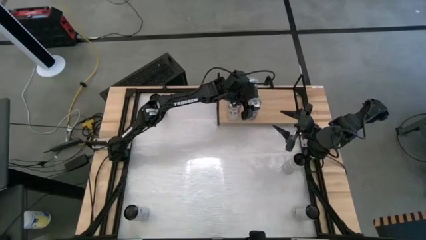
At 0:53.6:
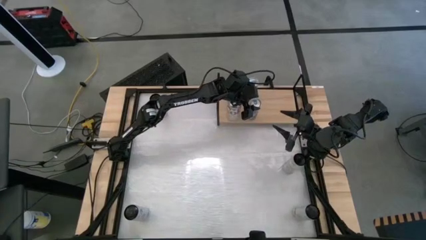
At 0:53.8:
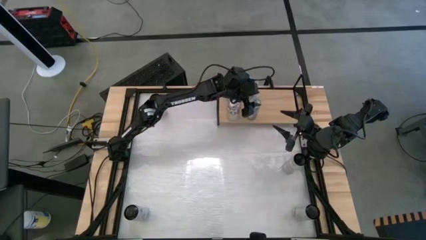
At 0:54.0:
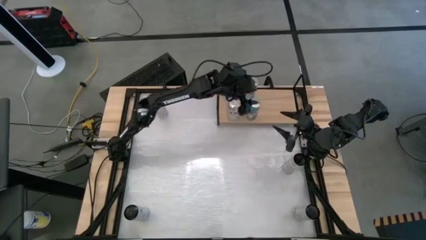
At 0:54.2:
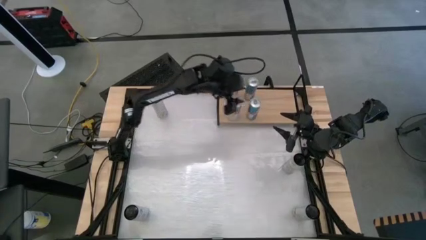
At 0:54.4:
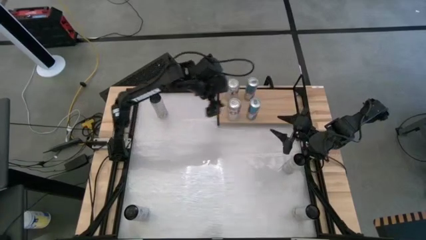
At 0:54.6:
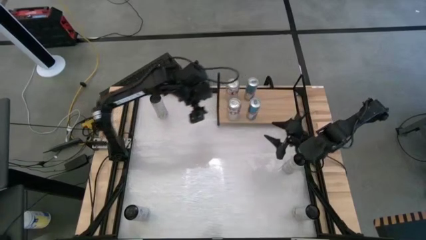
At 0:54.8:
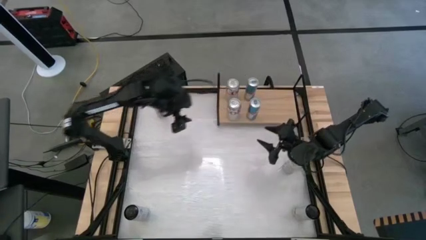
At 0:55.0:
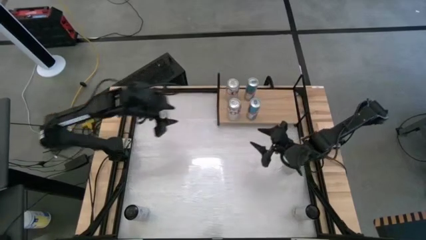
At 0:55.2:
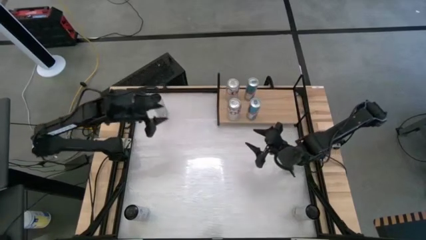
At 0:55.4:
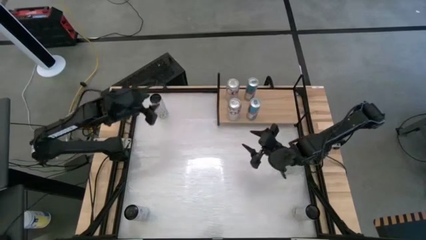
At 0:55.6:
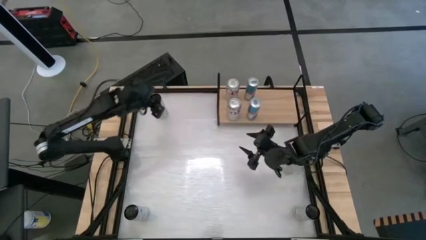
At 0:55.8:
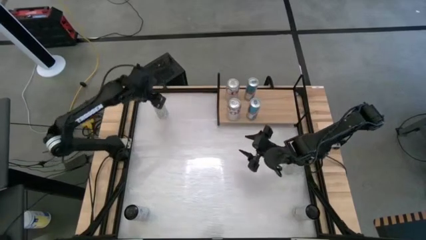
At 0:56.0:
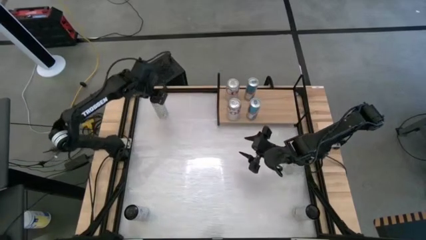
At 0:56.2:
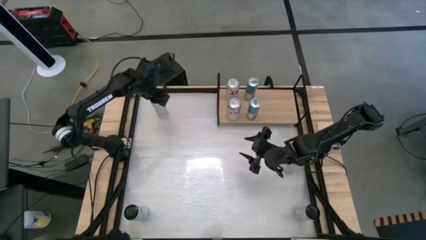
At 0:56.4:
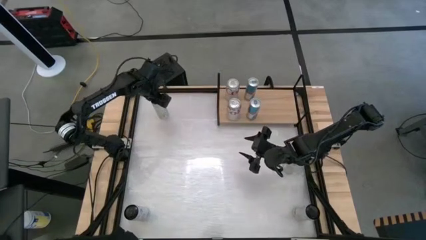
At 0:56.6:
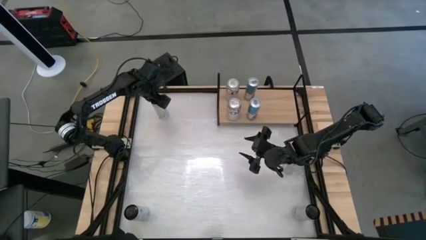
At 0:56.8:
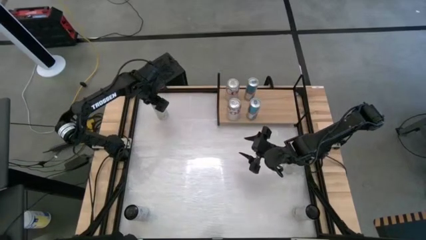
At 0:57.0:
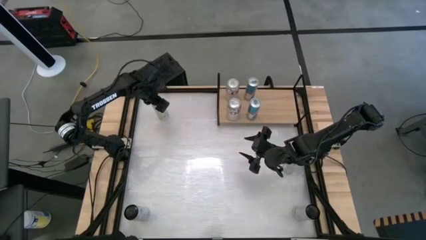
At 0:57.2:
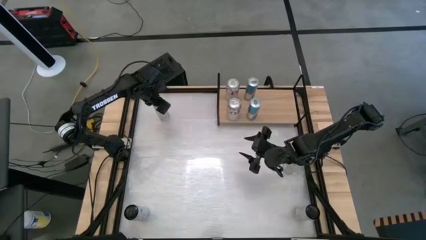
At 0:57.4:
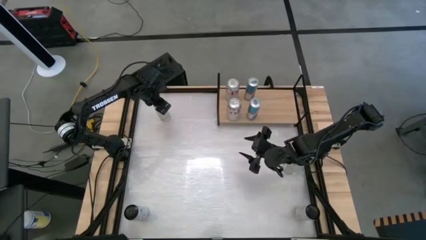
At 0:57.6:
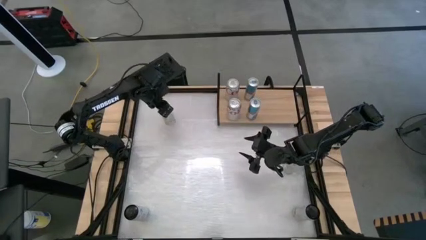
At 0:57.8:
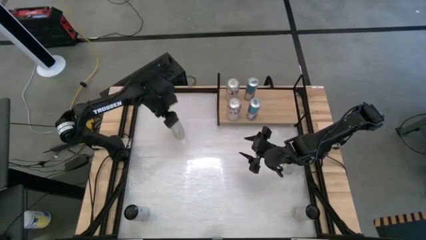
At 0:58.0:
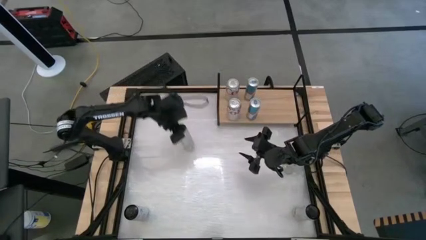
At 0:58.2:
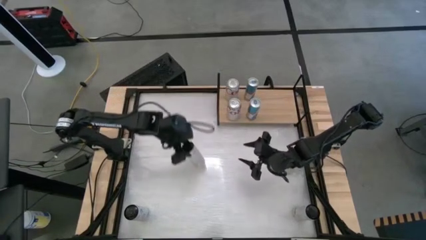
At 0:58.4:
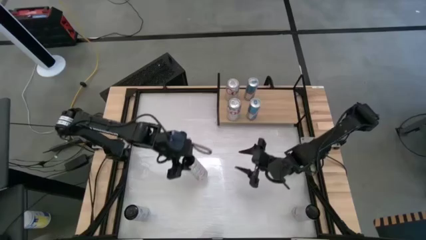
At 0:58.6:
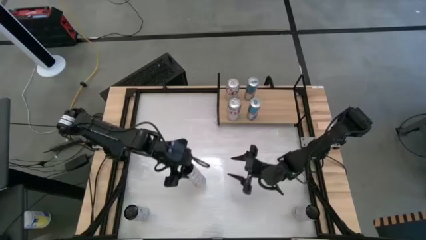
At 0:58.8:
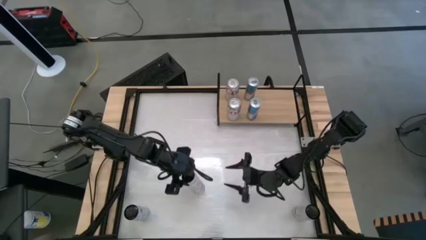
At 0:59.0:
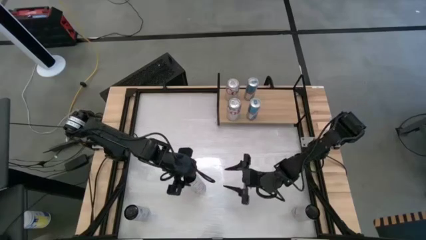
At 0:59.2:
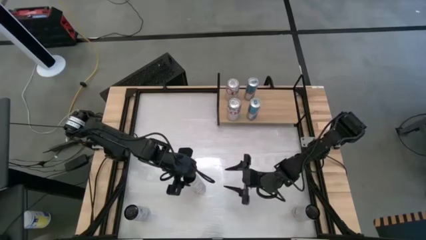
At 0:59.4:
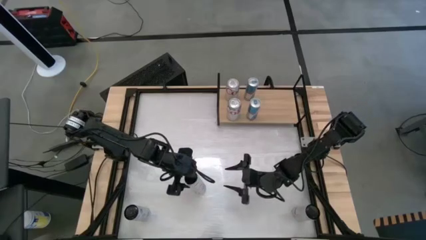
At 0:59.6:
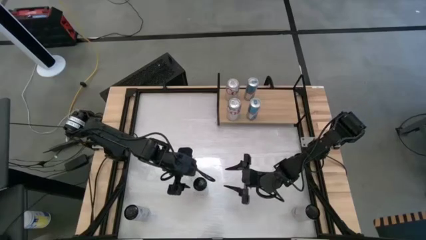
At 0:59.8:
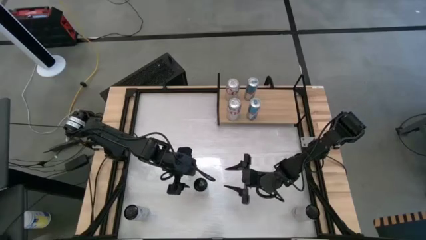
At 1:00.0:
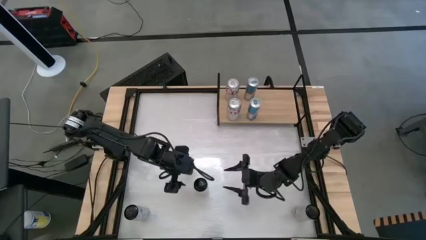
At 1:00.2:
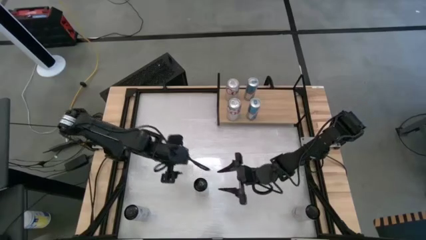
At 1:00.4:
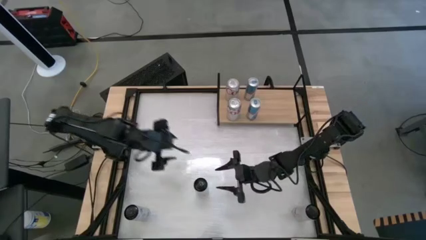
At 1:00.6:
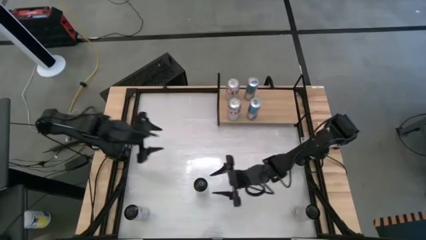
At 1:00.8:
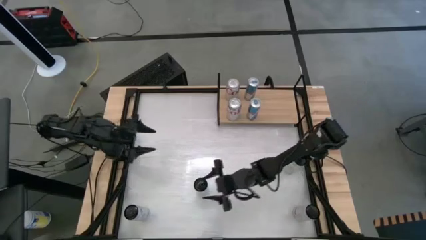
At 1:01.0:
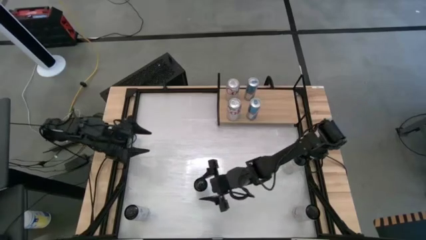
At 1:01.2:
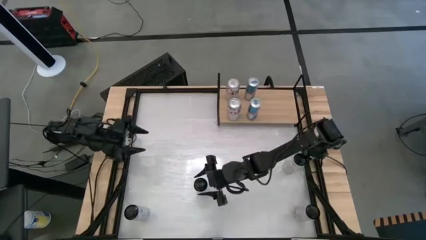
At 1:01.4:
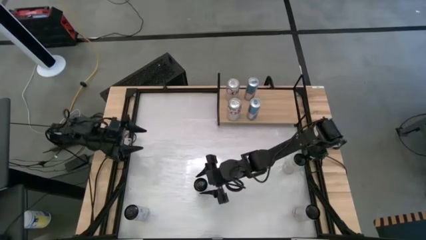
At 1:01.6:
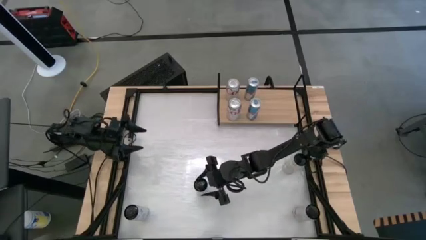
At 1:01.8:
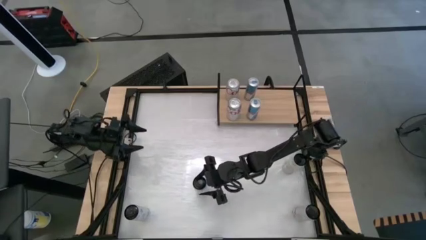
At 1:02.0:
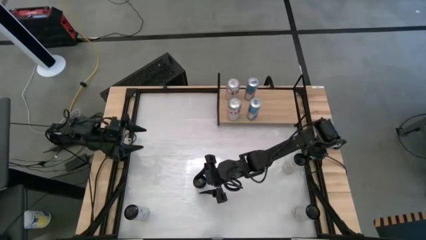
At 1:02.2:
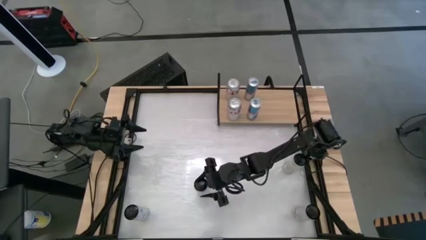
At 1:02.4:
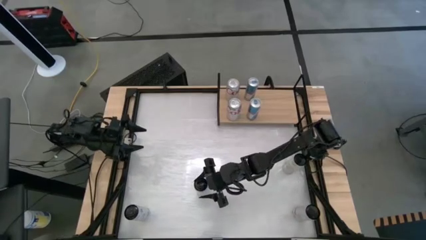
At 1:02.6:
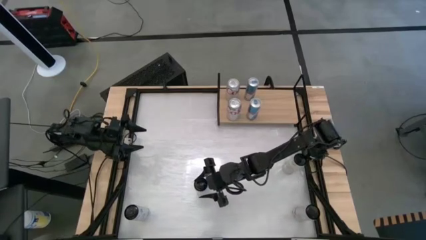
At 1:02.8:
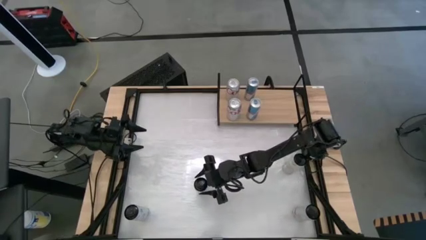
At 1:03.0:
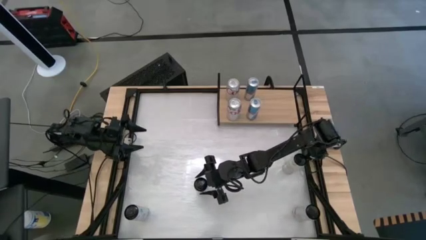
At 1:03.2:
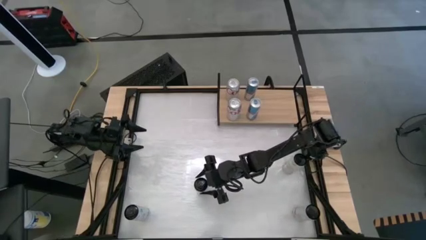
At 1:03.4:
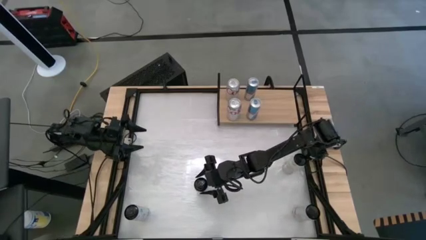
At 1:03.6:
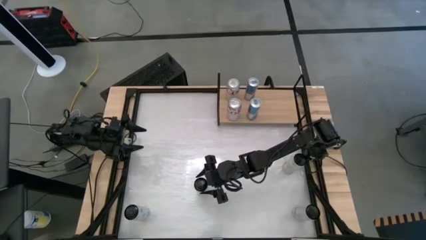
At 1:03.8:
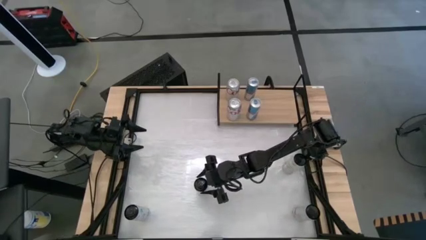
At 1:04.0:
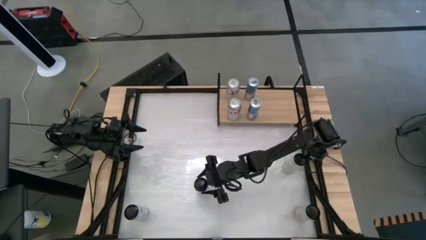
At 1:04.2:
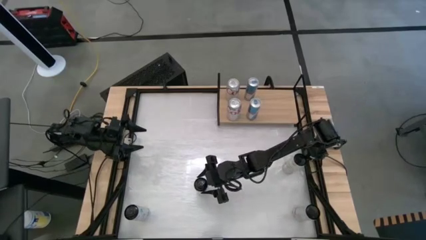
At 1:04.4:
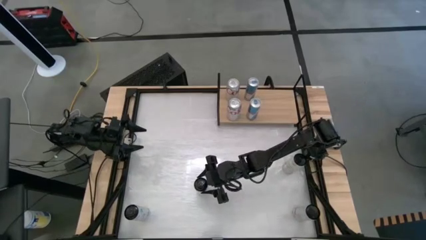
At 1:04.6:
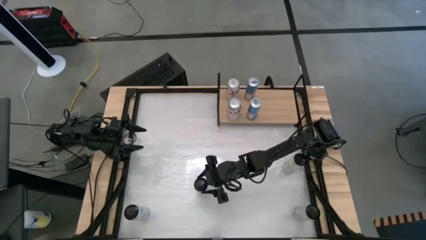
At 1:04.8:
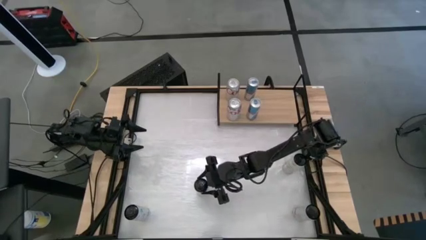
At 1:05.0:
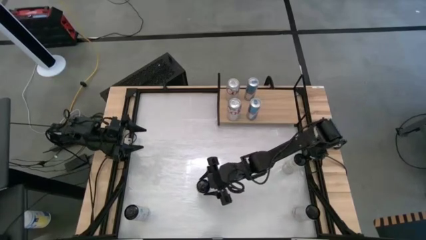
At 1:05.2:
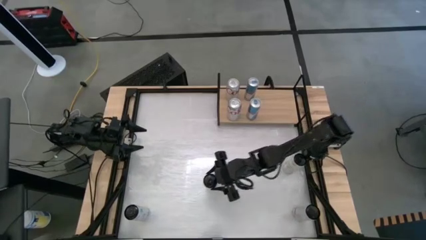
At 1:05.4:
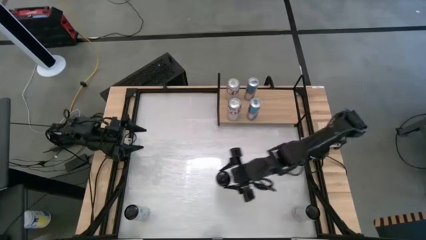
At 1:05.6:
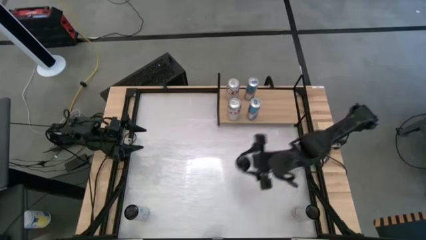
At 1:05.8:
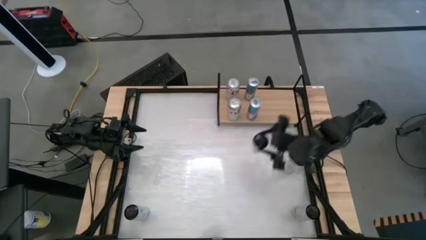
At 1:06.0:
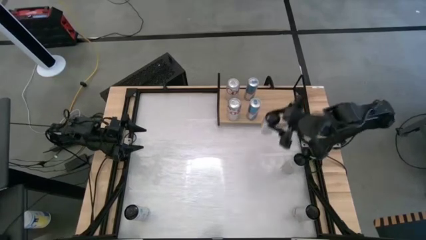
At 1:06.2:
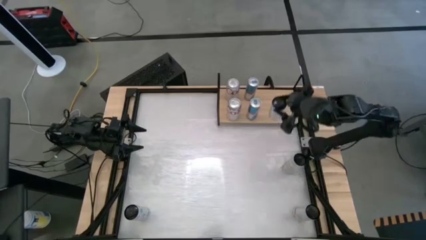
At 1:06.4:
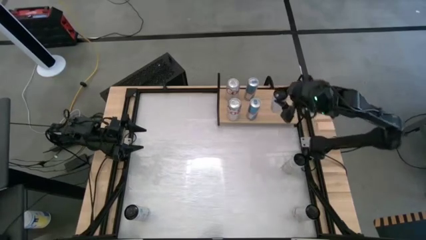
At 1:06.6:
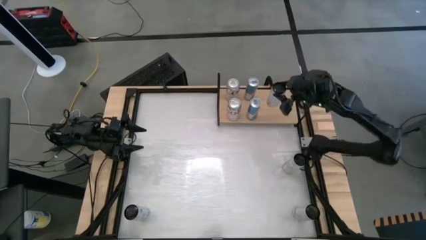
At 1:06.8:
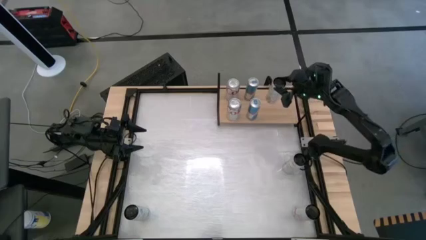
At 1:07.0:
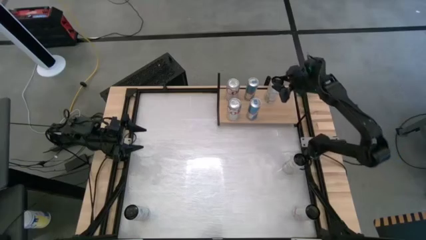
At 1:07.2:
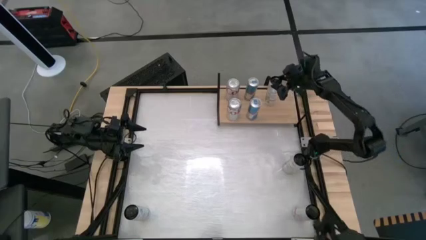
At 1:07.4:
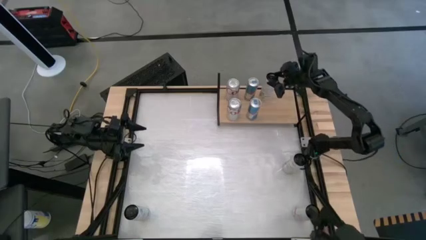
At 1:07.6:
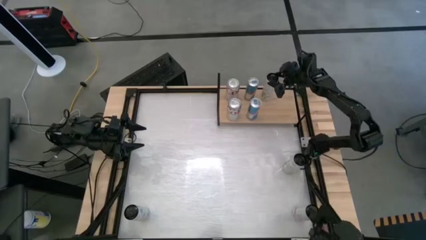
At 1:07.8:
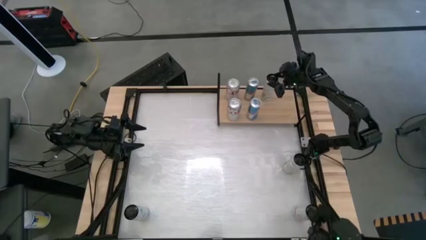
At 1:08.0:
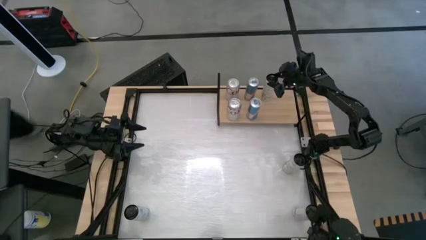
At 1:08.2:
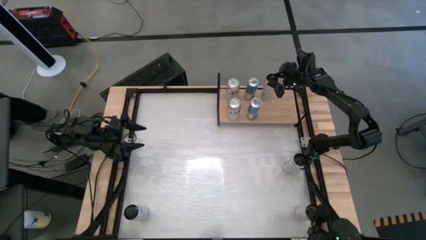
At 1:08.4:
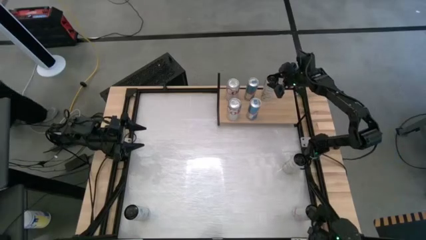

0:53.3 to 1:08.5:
Task: Place canned beverage on shelf
Put the top left black can on the shelf
